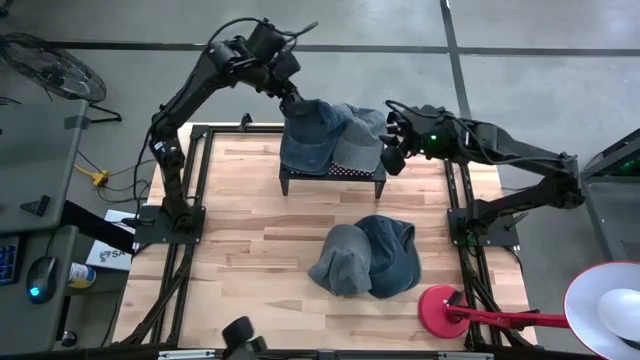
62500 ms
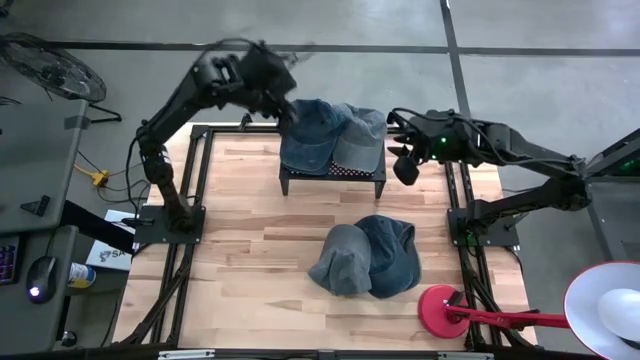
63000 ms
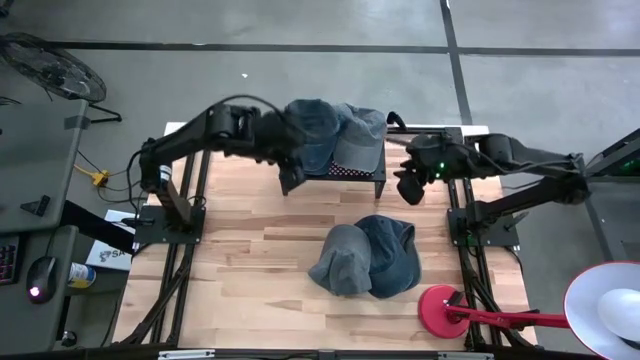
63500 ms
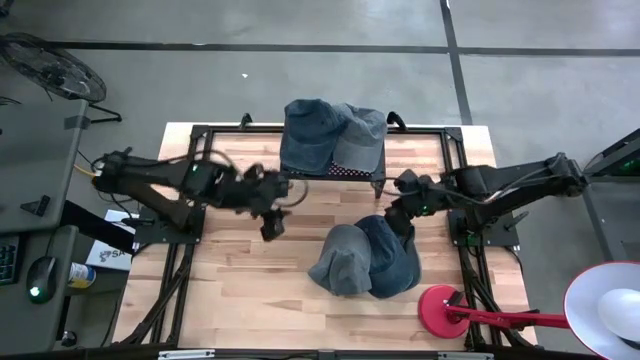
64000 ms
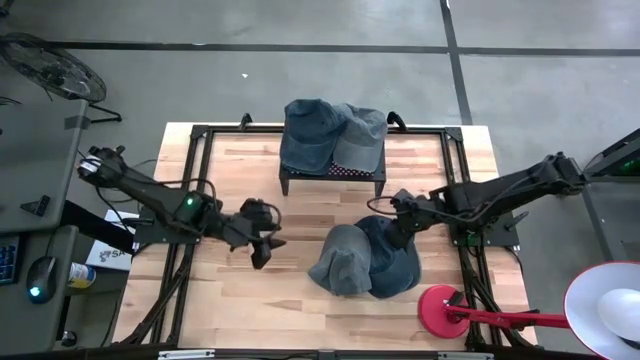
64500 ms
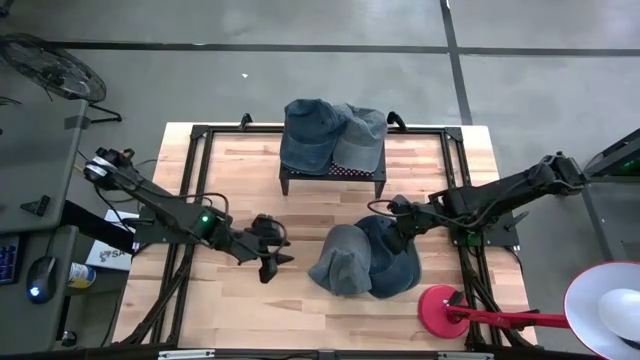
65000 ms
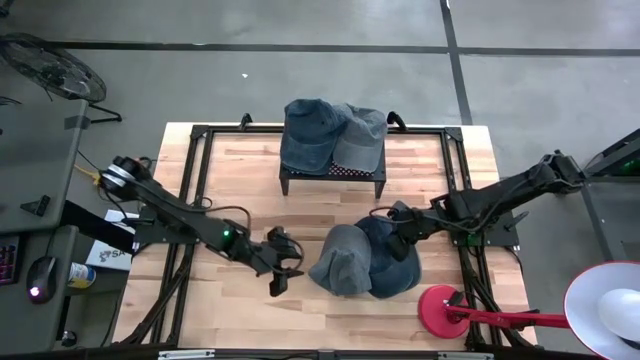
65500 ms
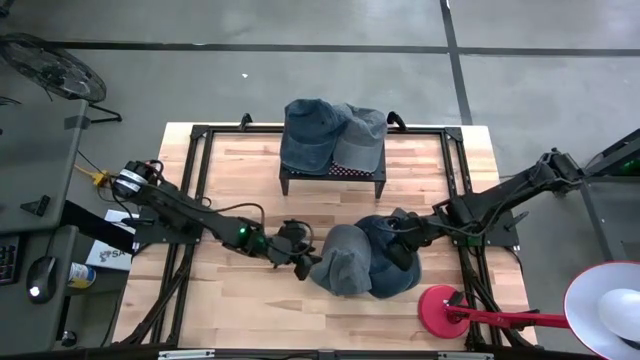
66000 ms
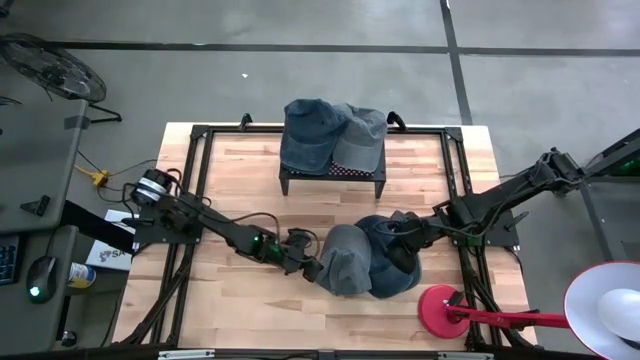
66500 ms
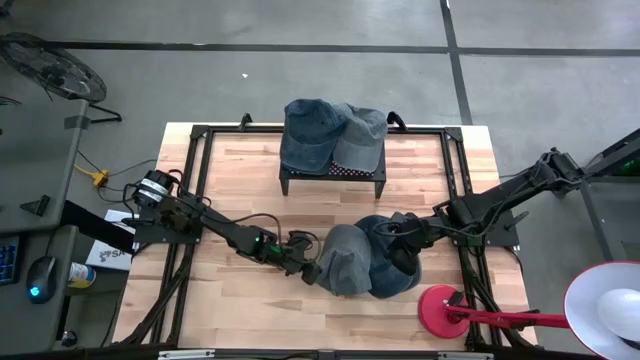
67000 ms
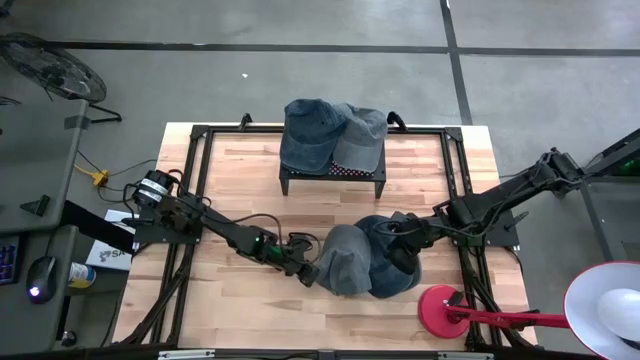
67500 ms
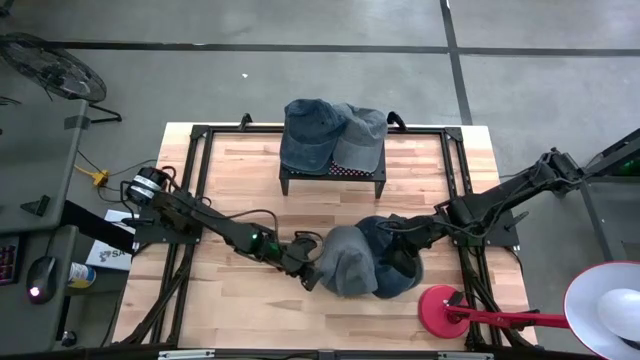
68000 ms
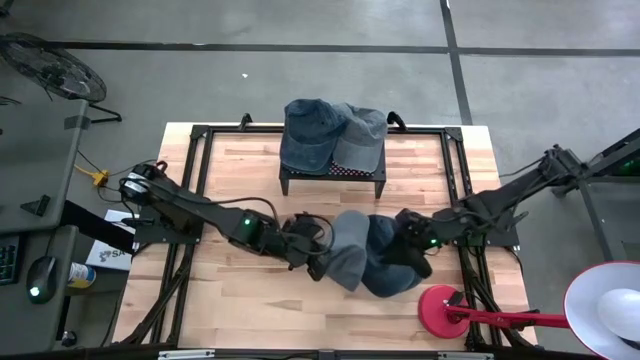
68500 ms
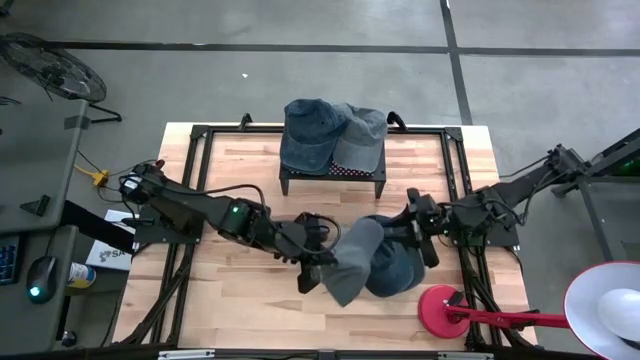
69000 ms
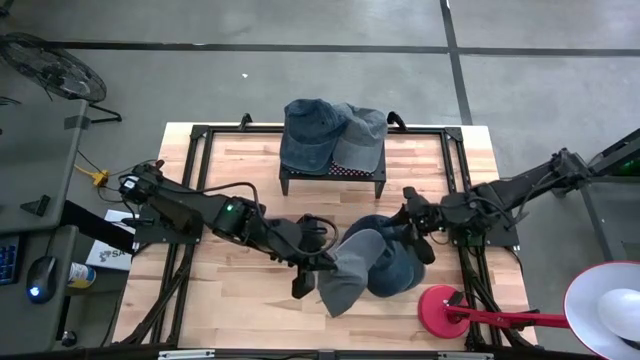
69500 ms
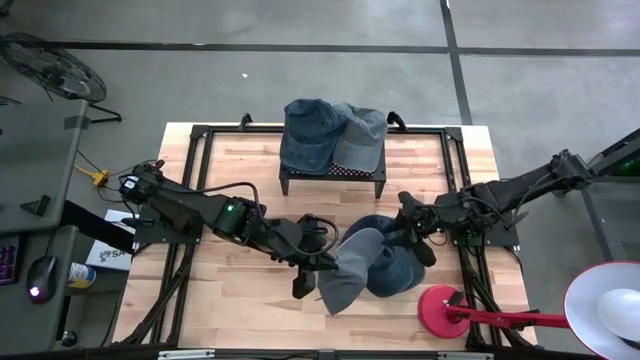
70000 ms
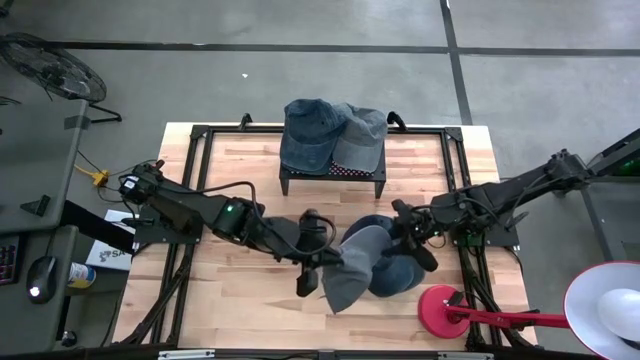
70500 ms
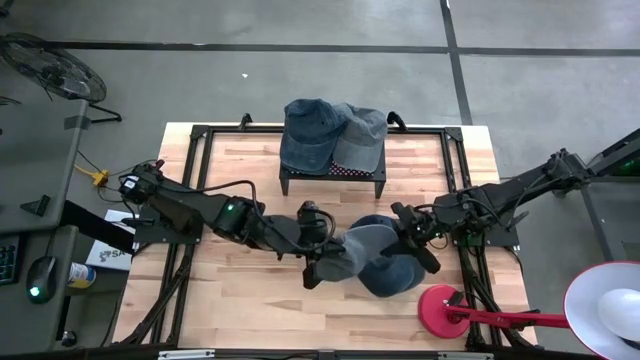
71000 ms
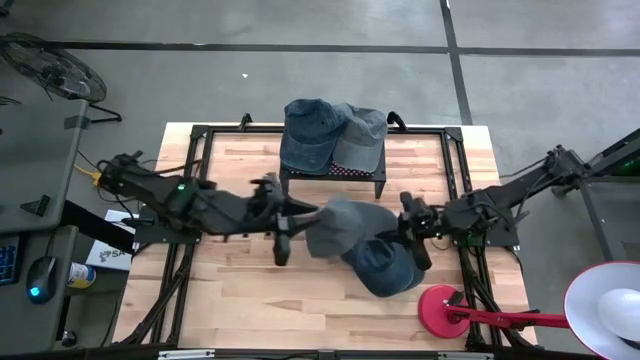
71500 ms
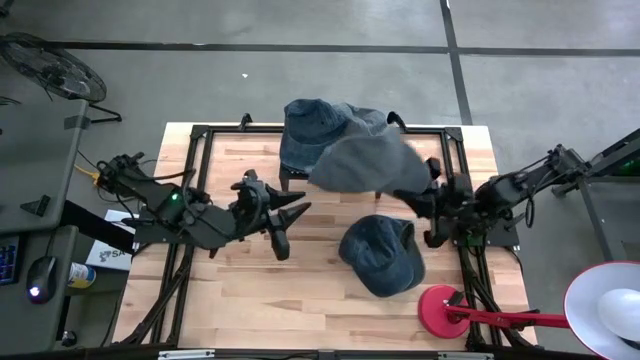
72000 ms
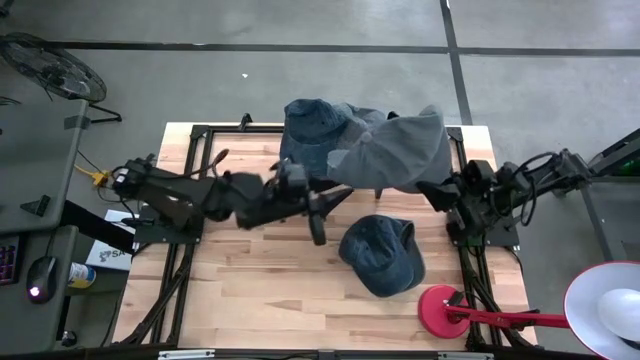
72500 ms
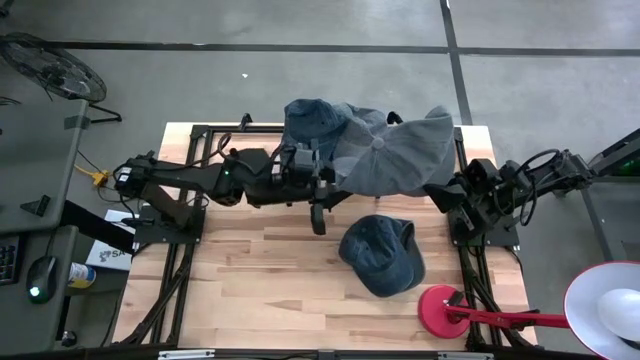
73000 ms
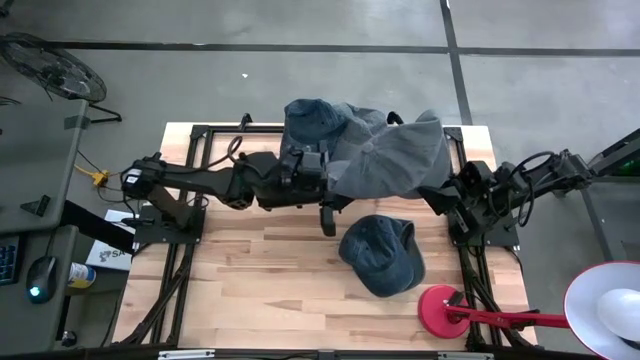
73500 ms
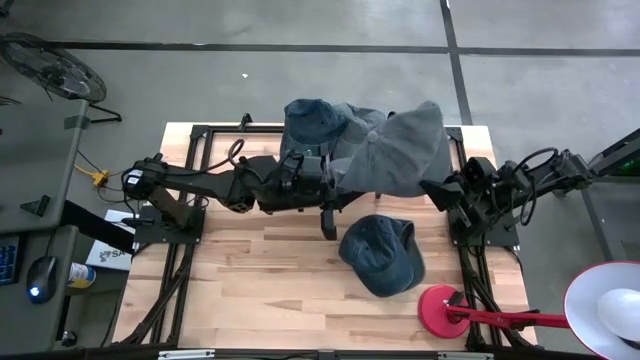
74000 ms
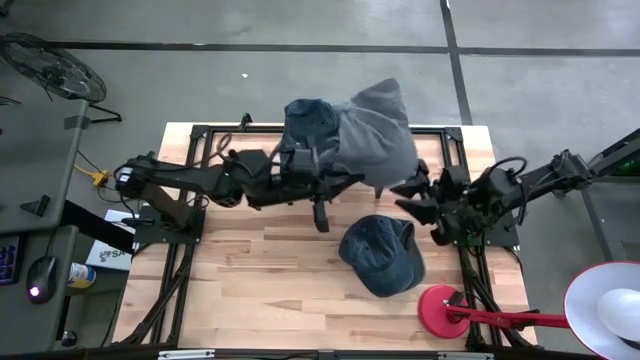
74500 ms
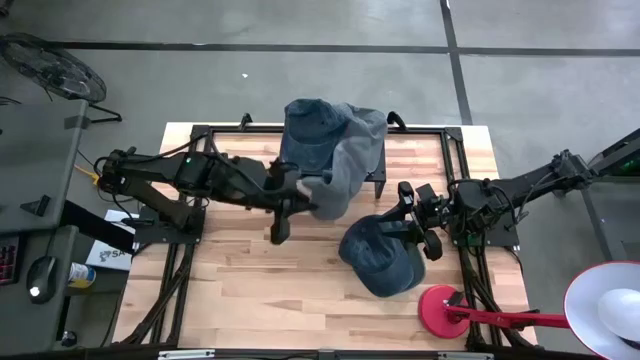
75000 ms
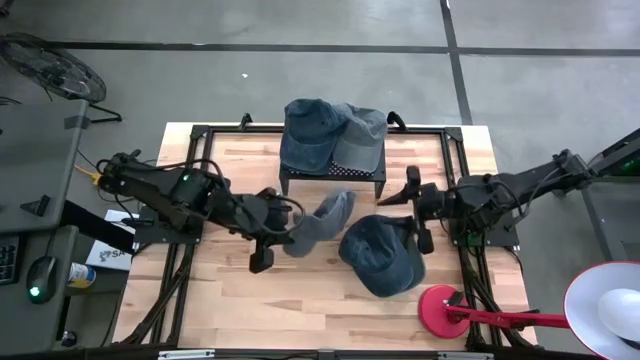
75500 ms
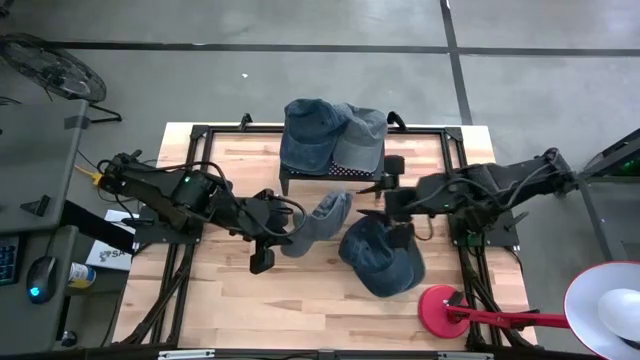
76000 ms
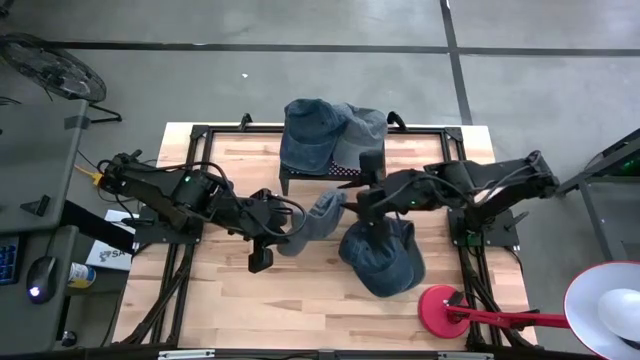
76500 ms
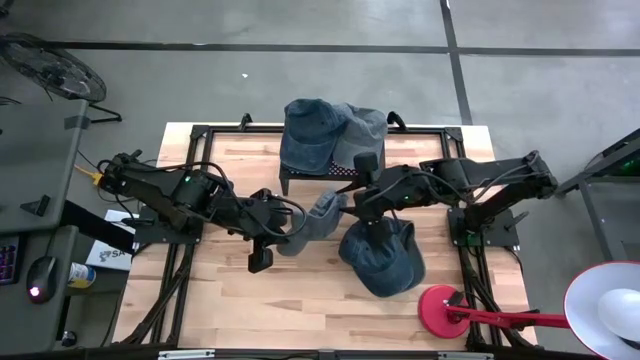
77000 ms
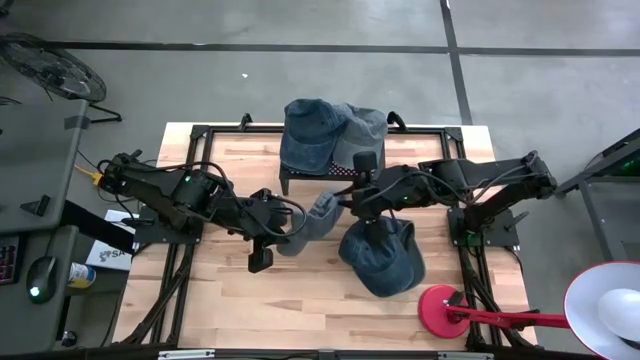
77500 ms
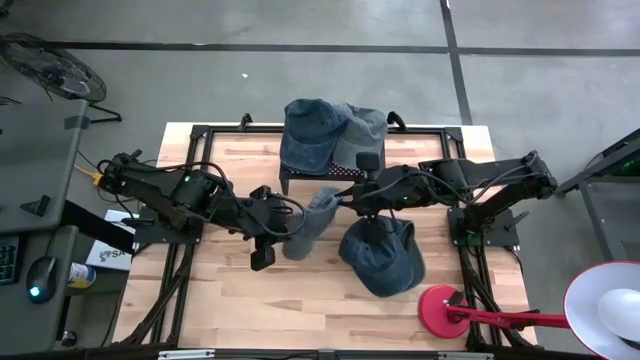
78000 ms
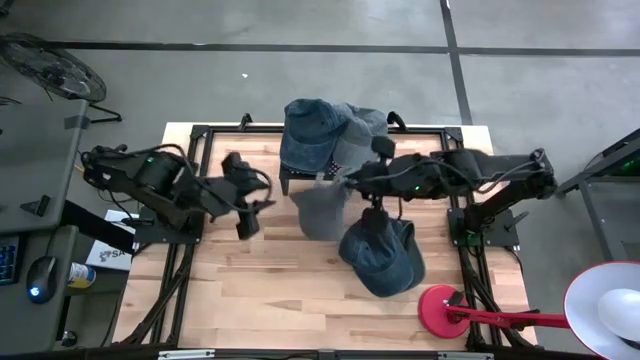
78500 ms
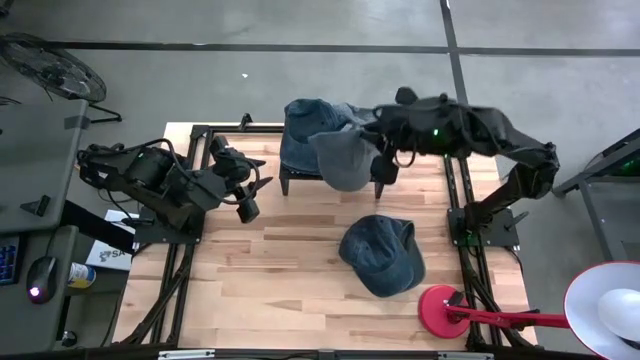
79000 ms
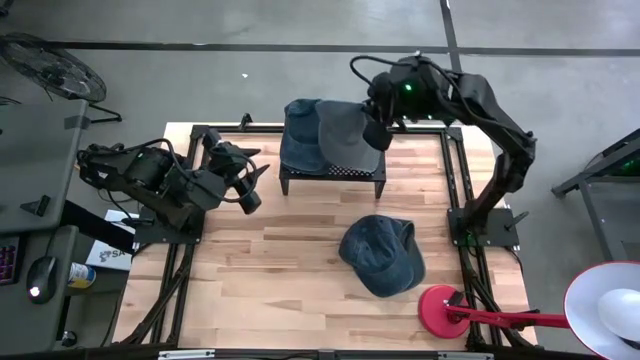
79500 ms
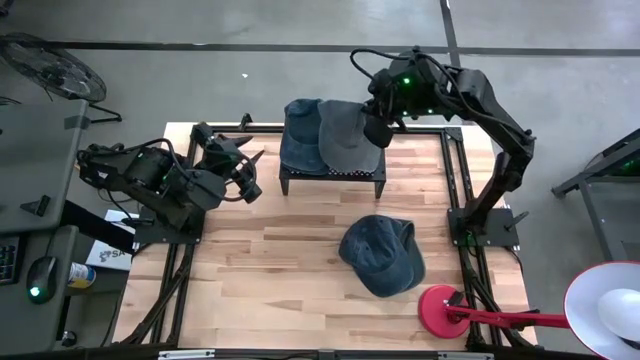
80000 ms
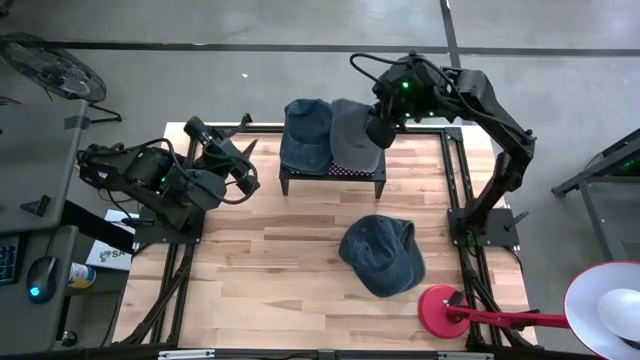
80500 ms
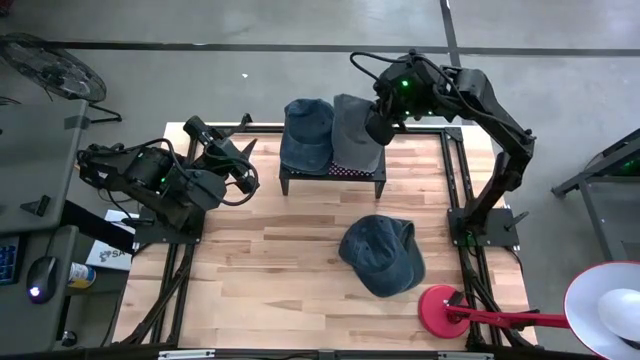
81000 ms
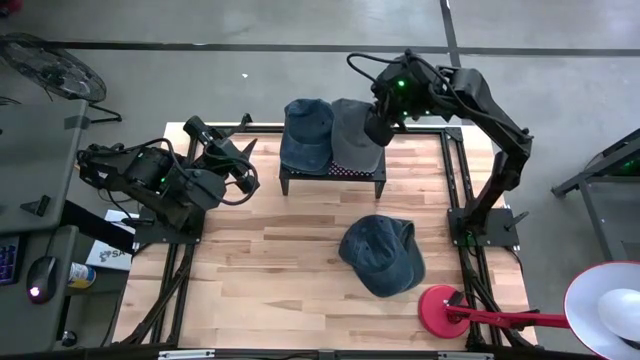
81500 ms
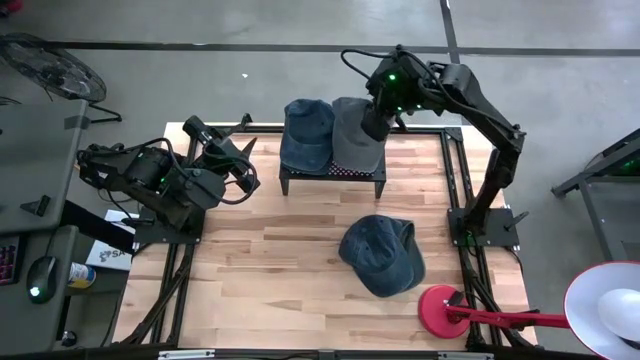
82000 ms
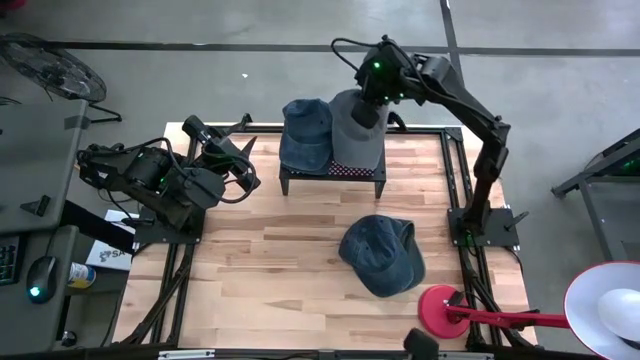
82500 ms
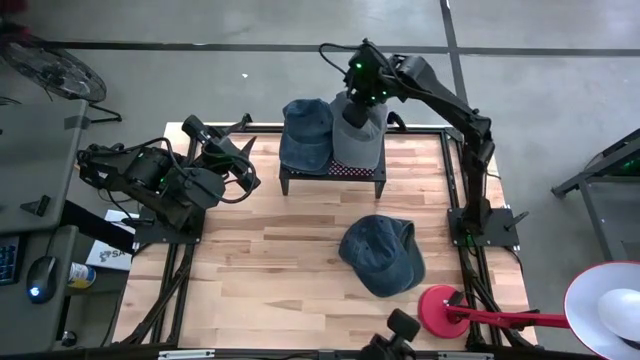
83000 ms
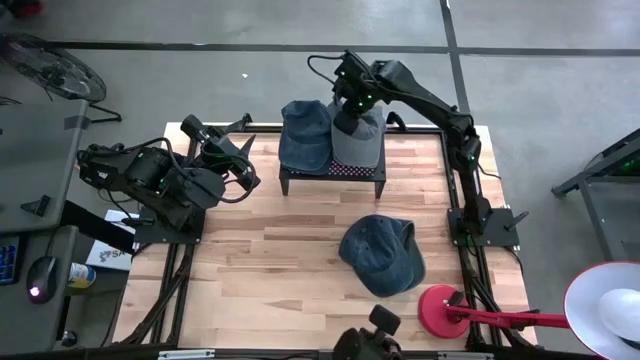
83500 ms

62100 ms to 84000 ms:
Task: Pick & Place hat
Stack the left gray cap on the gray cap on the shelf

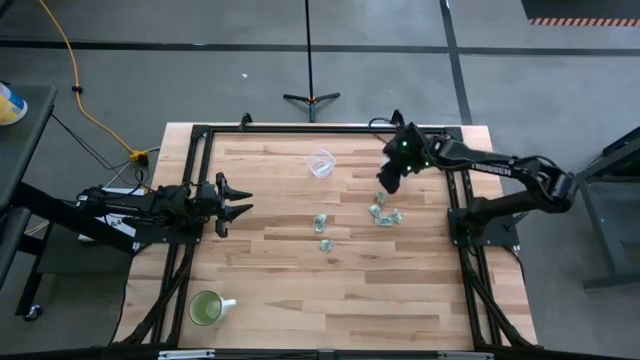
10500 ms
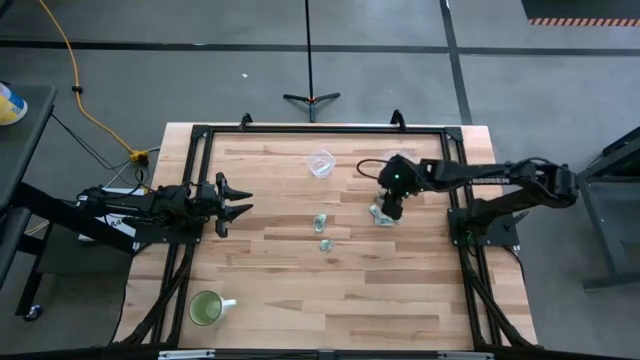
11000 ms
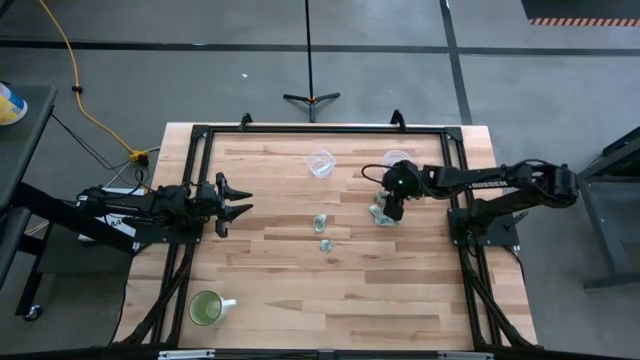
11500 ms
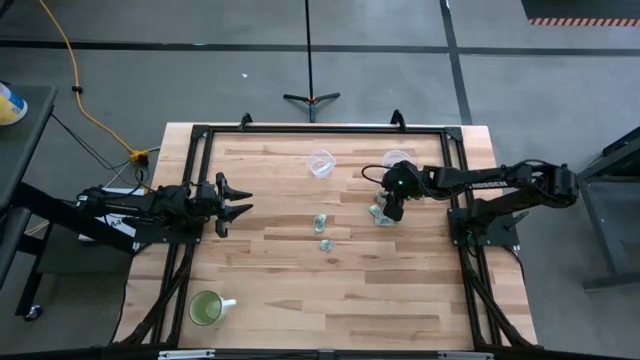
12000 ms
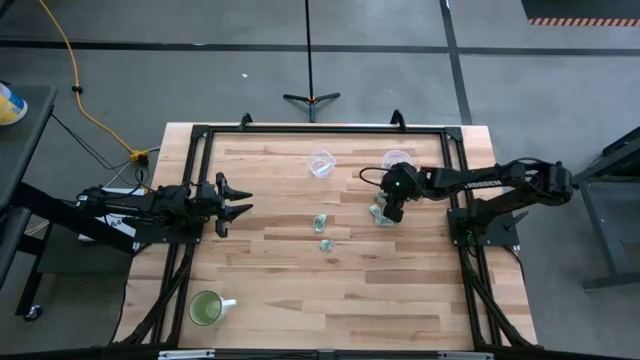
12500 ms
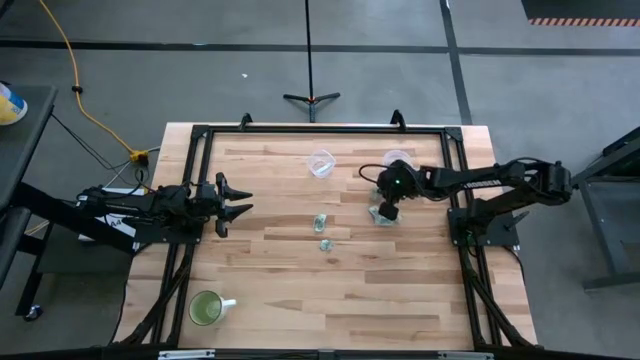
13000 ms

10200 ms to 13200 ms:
Task: Pick and place Stevia / Truvia into bins
Put the stevia packet into the right transparent container
